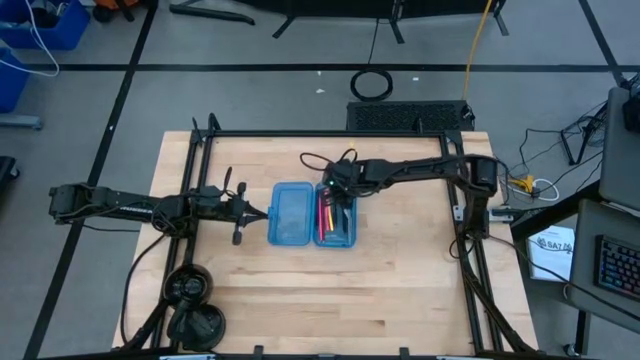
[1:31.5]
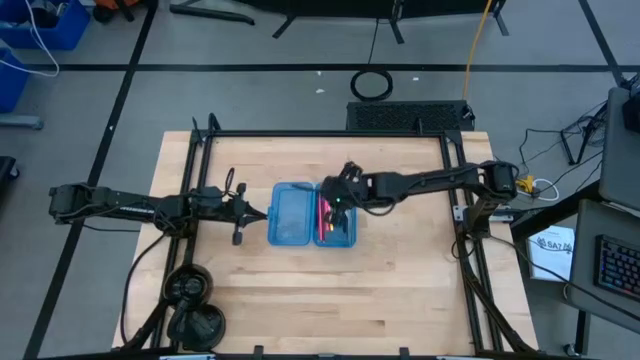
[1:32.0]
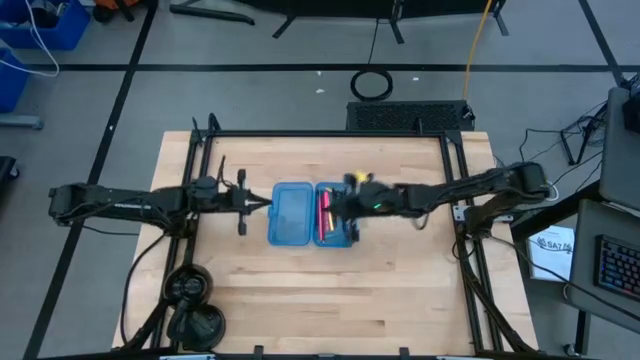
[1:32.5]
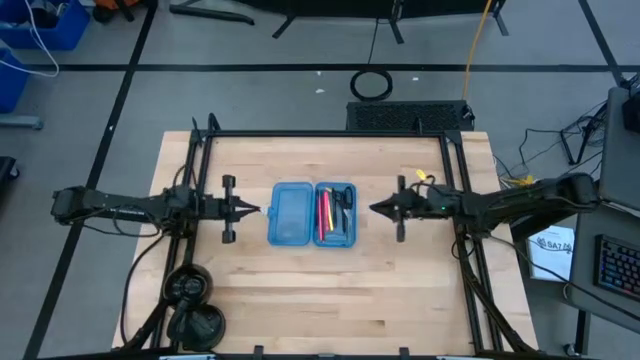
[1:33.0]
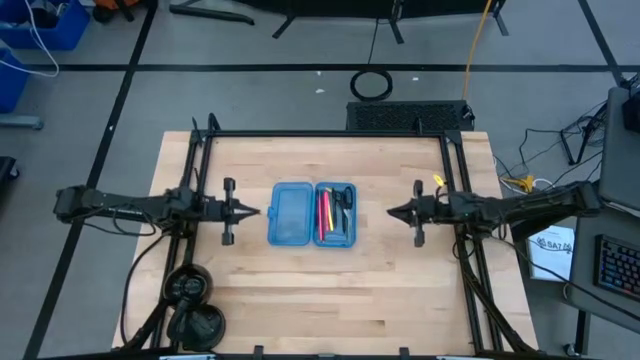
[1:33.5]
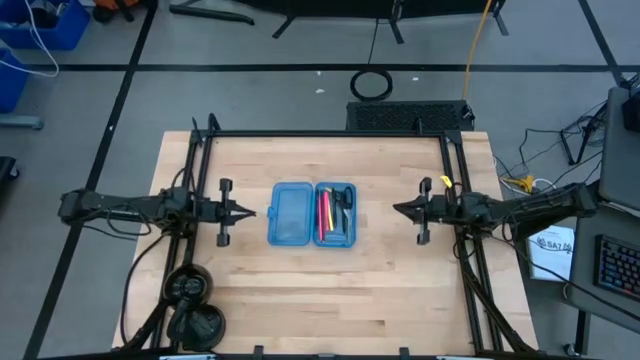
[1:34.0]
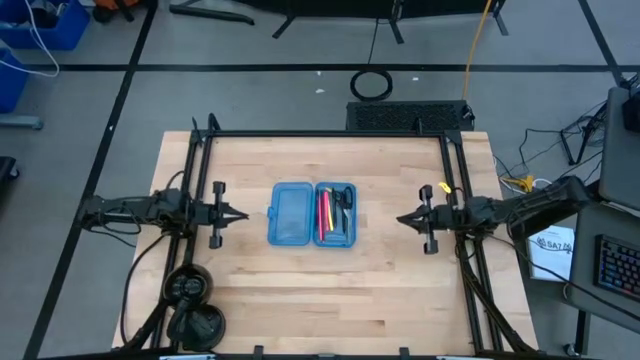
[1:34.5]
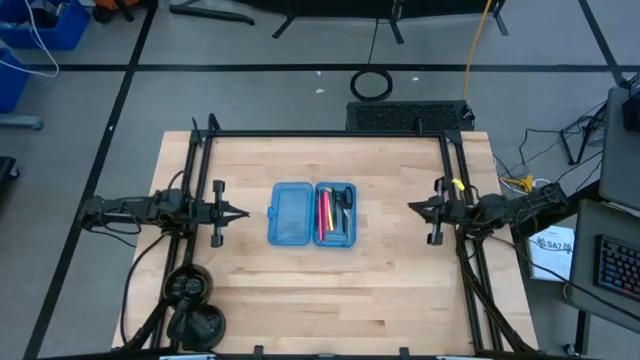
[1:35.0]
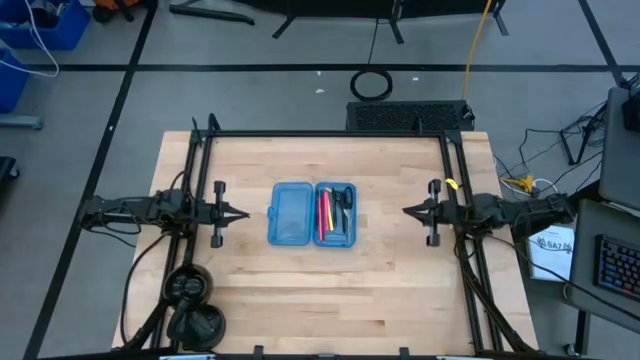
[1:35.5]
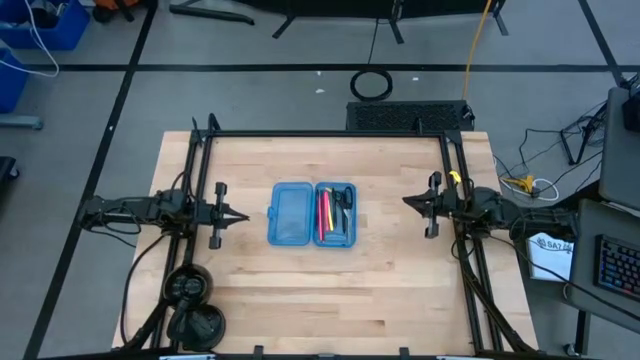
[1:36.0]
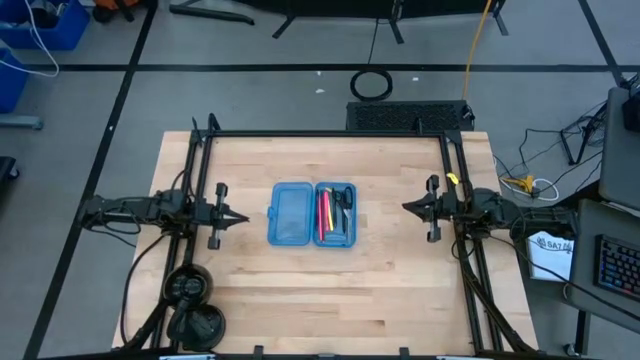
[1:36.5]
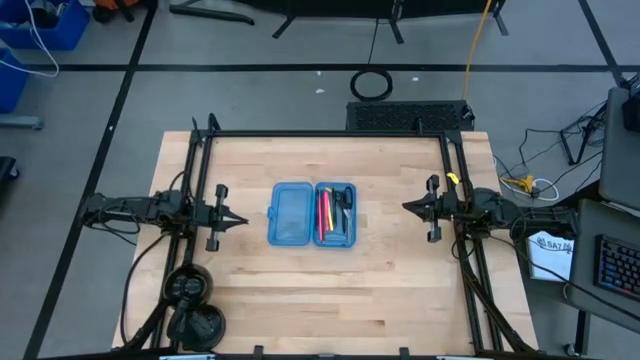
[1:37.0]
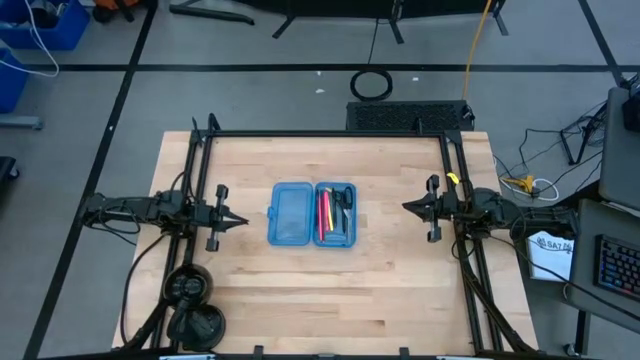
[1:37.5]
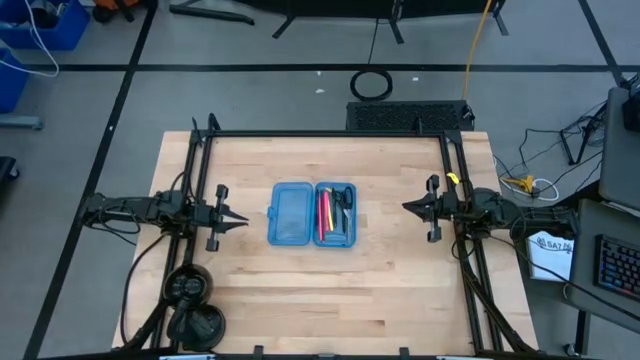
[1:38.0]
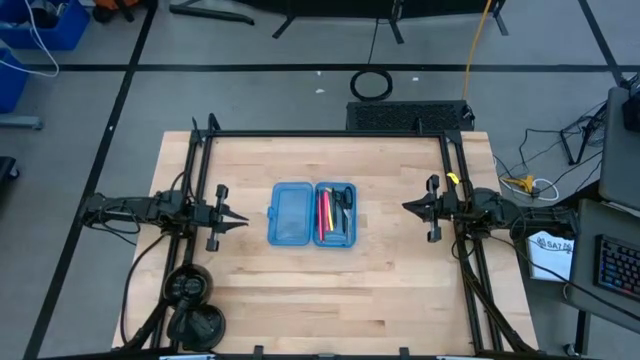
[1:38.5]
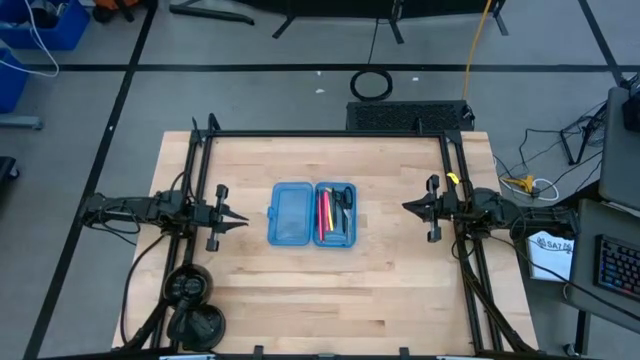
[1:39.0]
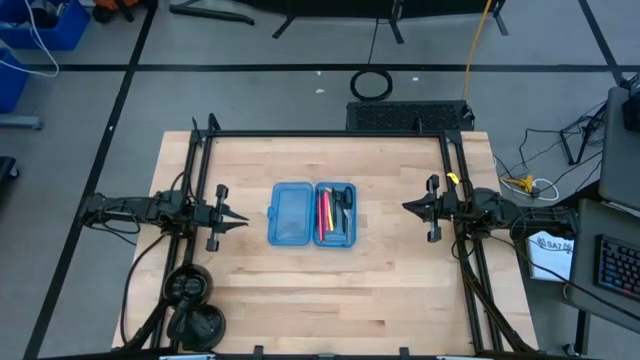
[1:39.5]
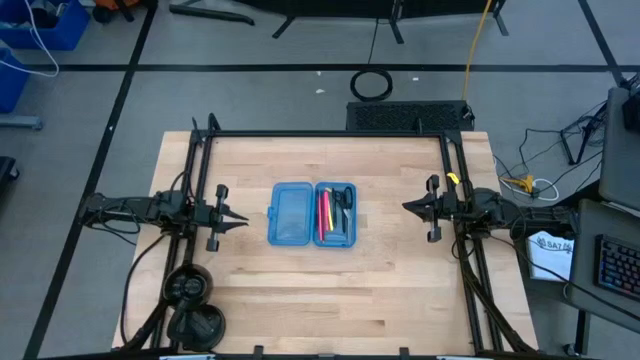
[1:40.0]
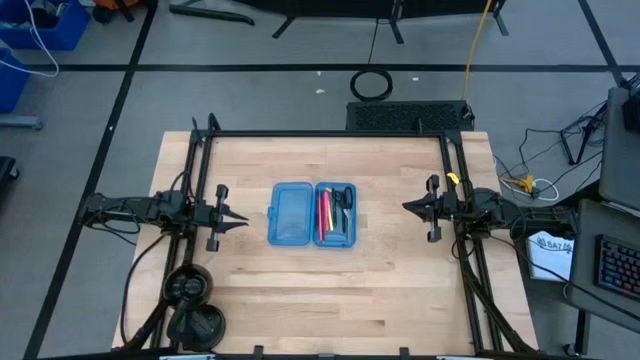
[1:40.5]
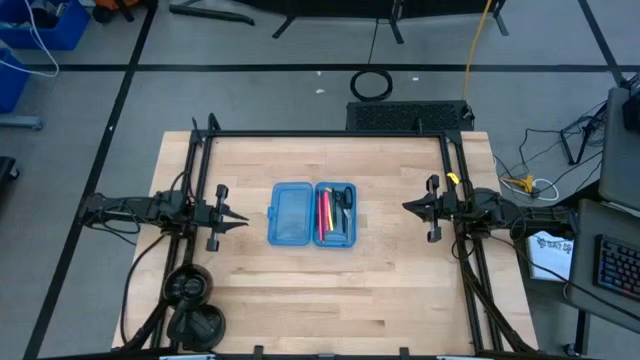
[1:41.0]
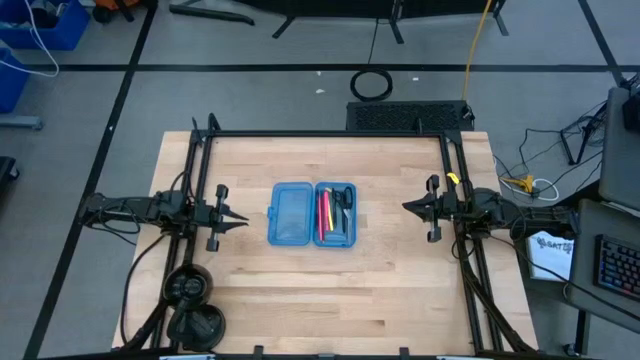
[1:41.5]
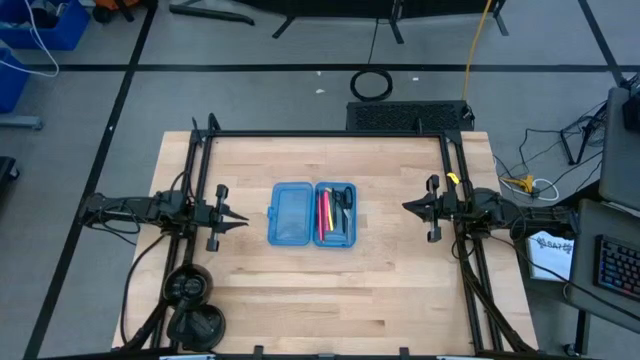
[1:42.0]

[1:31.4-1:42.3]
Task: Pick & place school supplies into a supply box
Return to Home Position

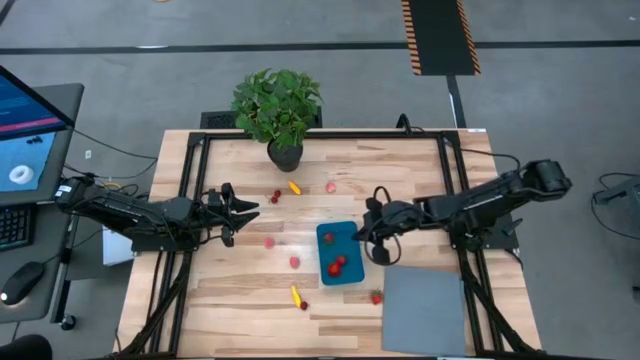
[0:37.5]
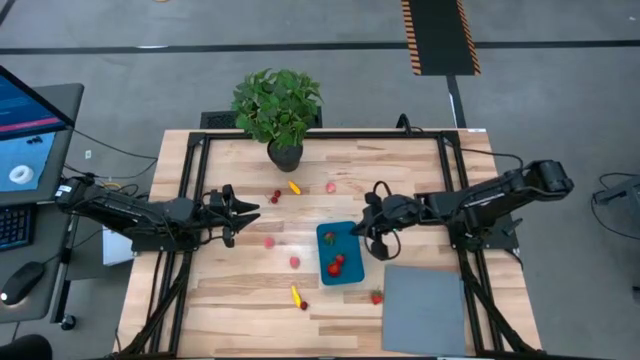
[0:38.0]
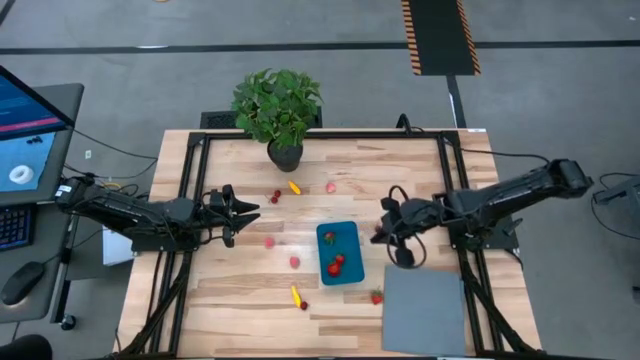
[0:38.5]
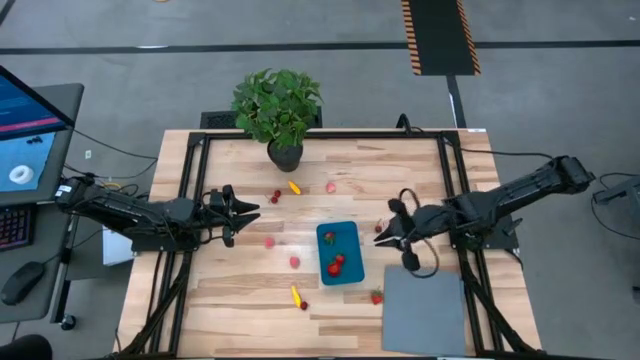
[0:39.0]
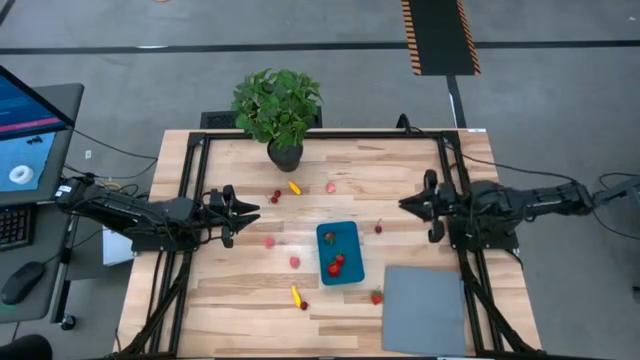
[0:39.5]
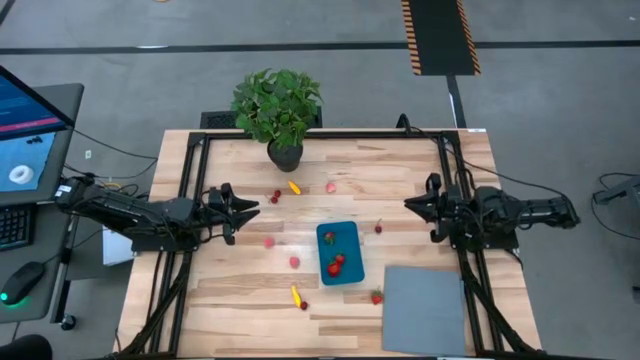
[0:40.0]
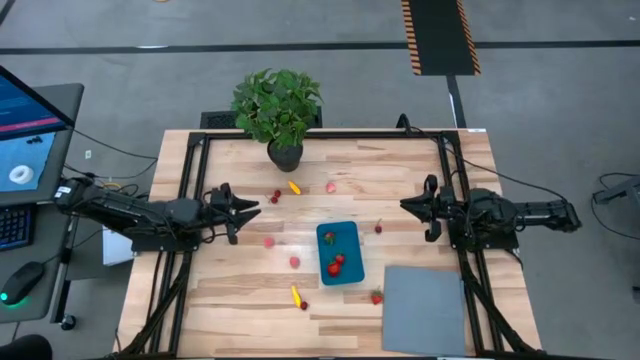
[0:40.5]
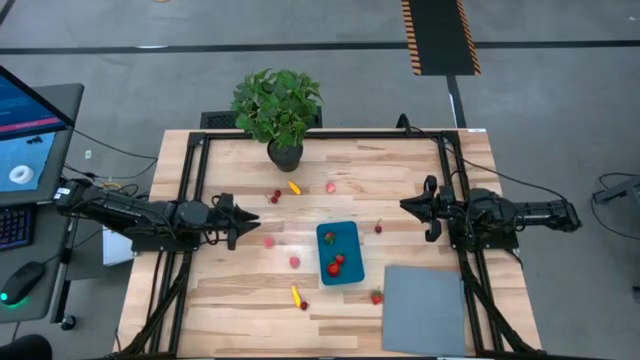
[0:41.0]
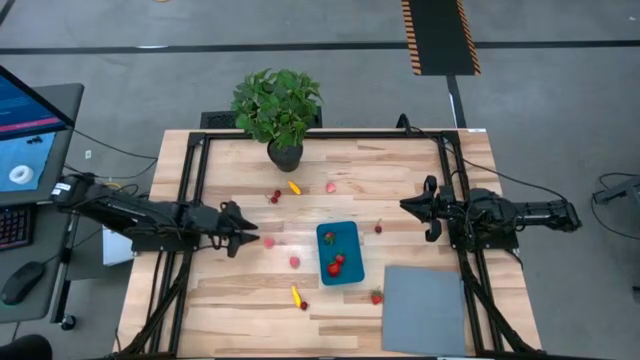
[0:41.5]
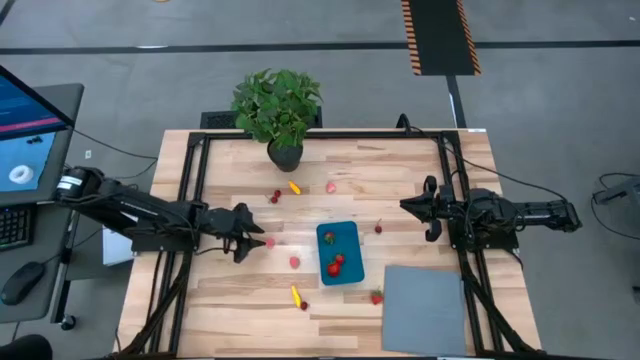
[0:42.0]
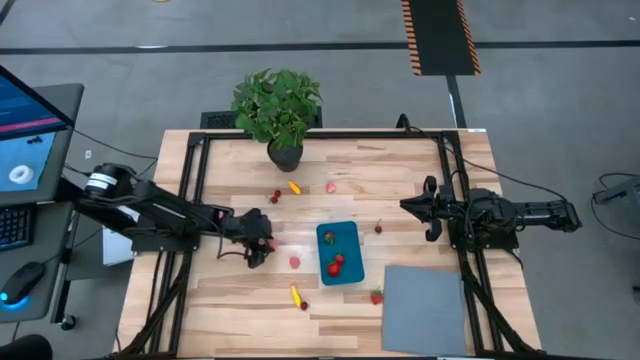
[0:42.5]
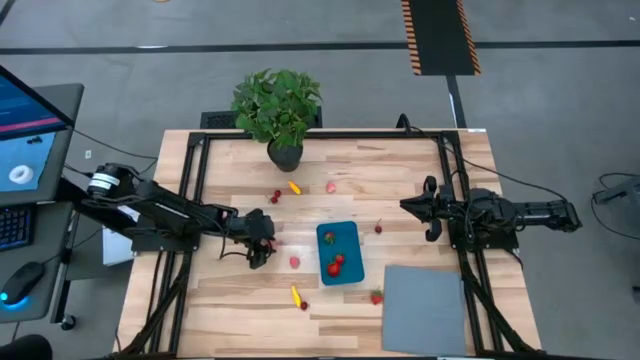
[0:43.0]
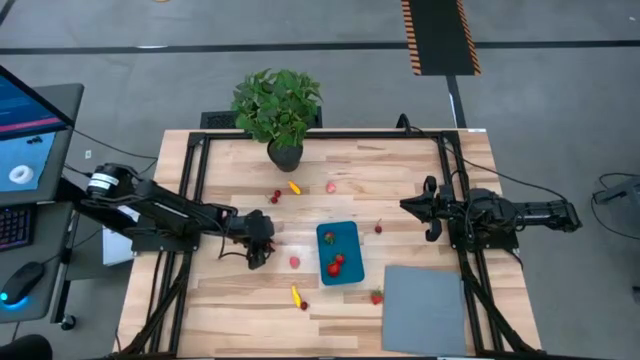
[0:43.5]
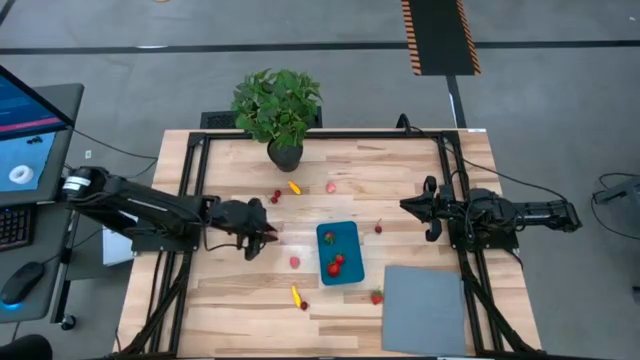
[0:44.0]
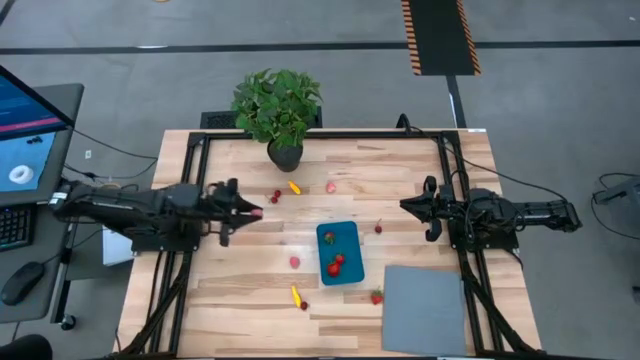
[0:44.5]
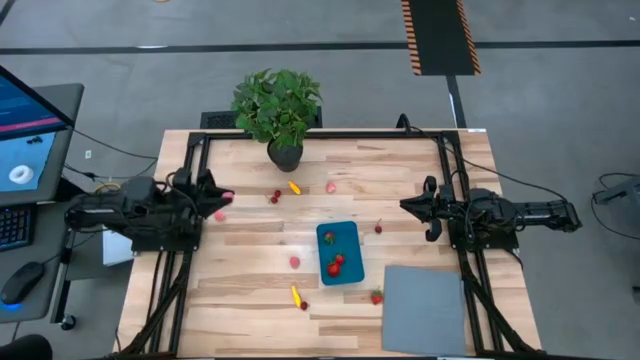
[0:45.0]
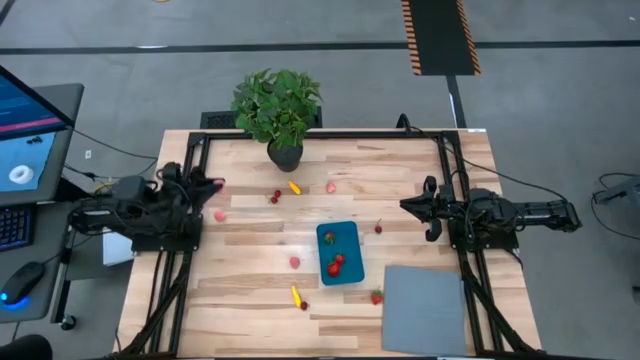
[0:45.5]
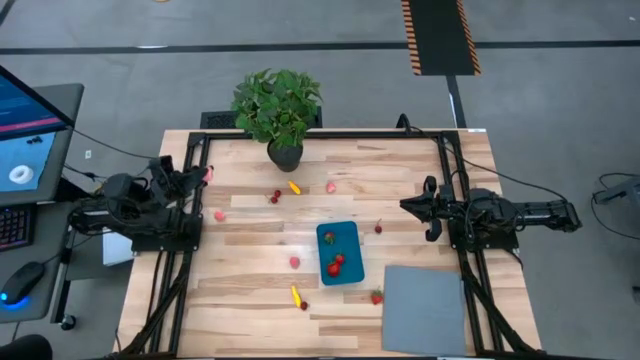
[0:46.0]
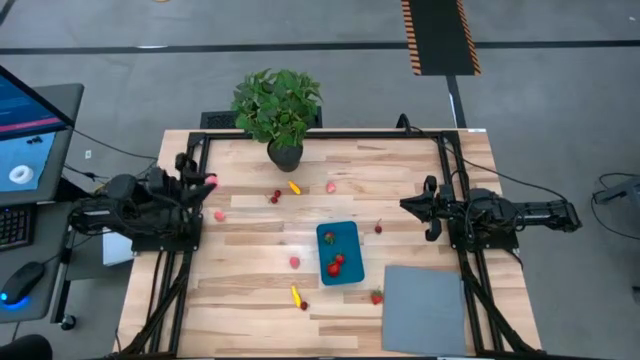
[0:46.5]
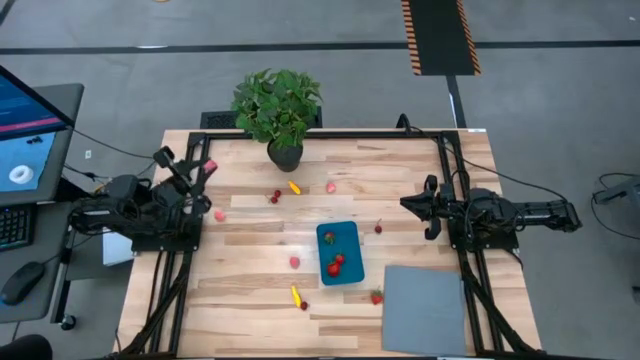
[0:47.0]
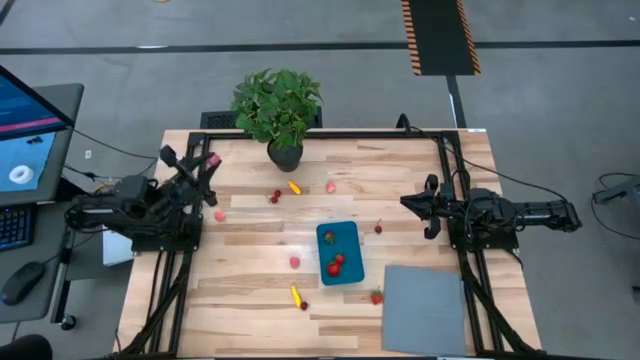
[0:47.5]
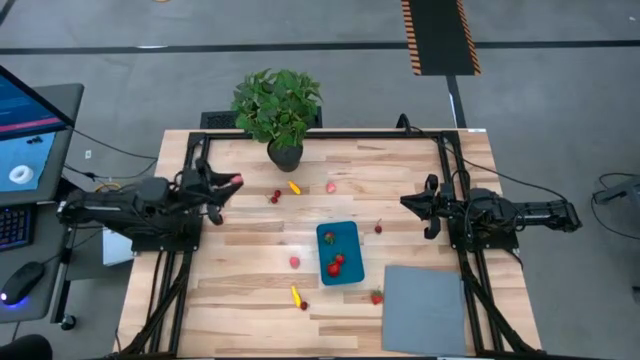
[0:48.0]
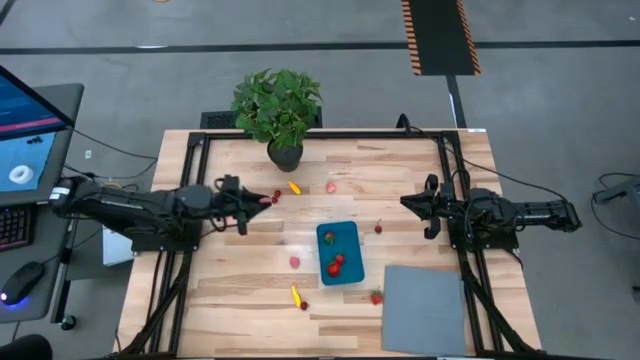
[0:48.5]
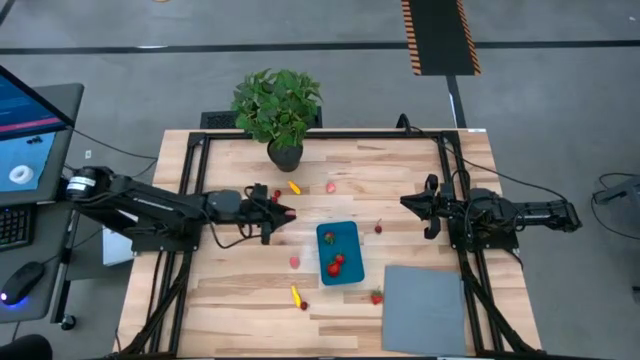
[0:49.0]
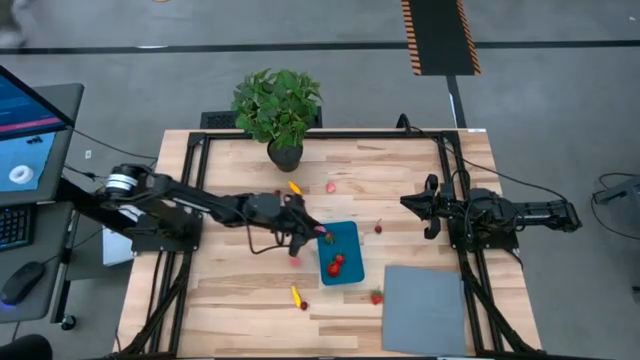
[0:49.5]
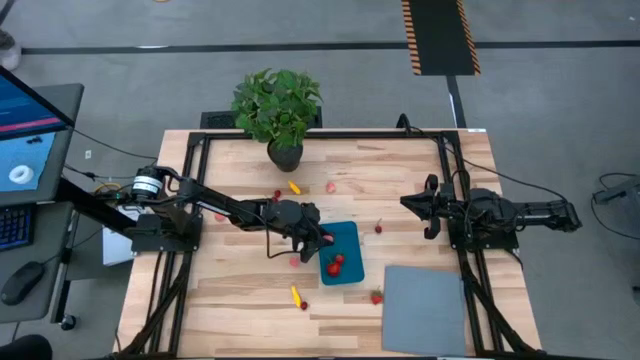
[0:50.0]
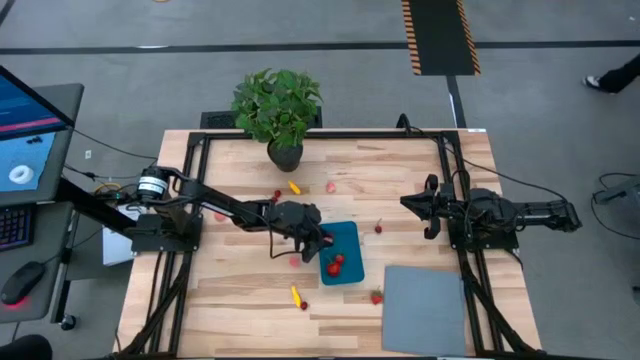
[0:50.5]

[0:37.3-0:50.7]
Task: Pick and placing Produce into tupperware
Put the apricot into the blue bin
